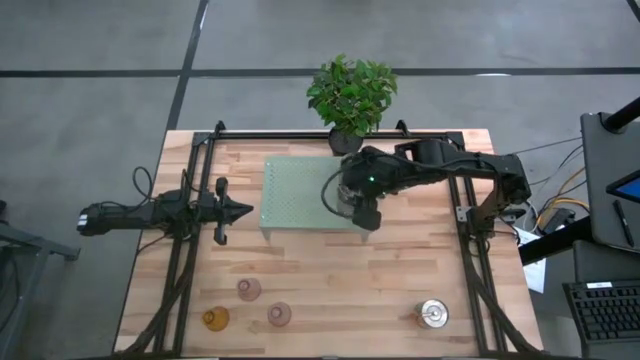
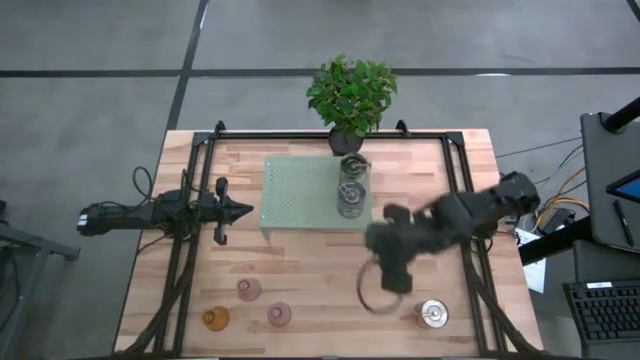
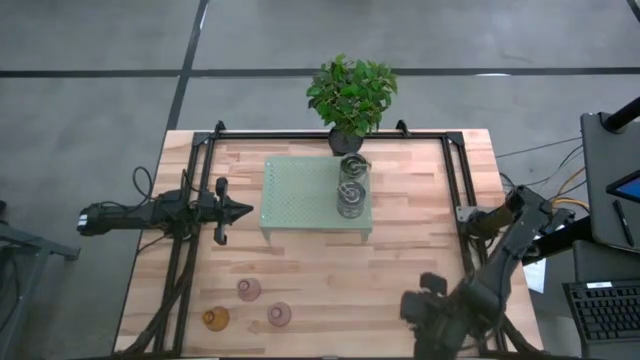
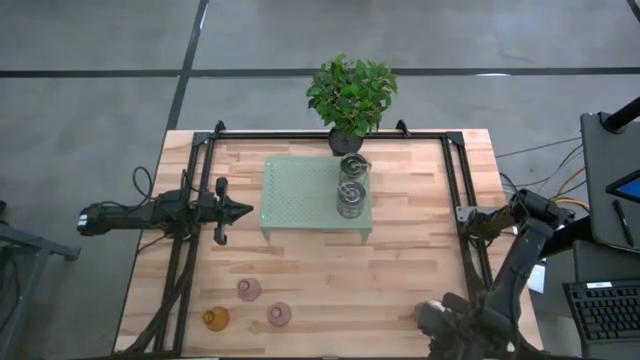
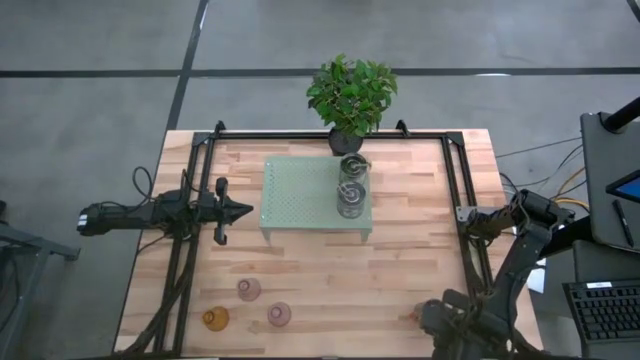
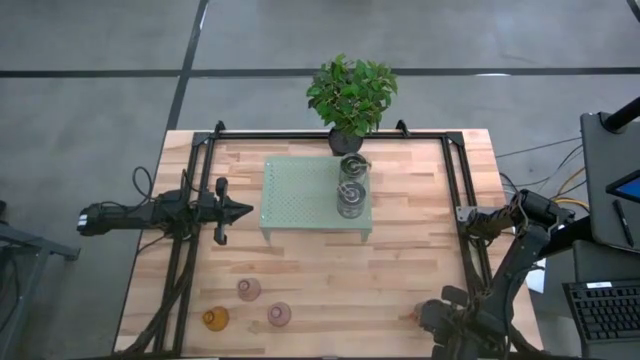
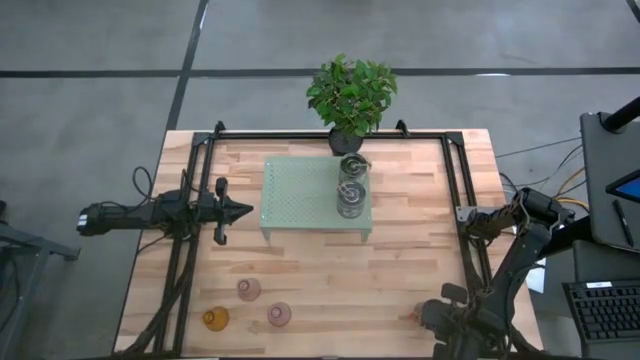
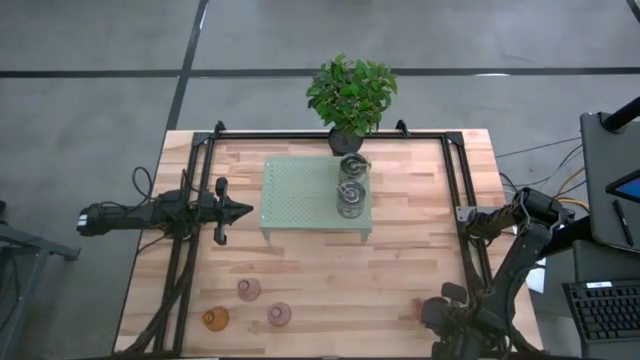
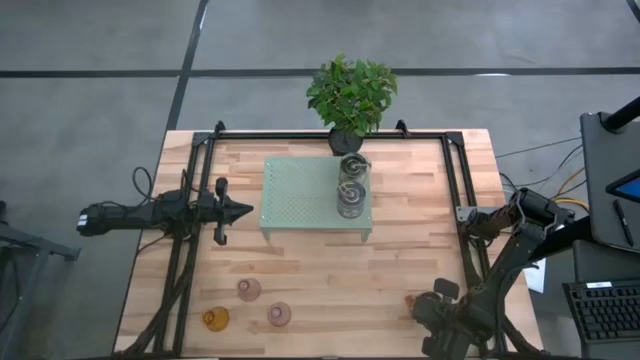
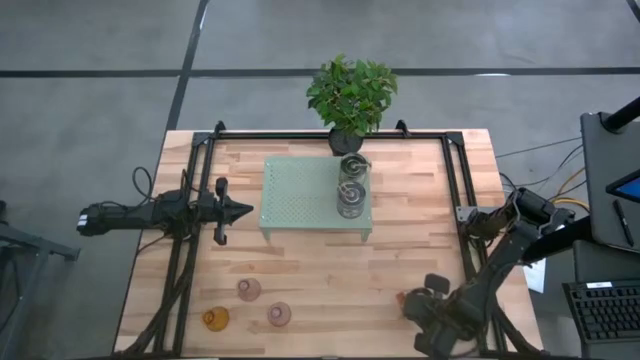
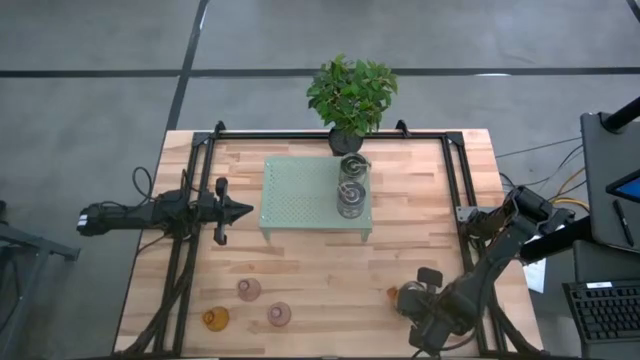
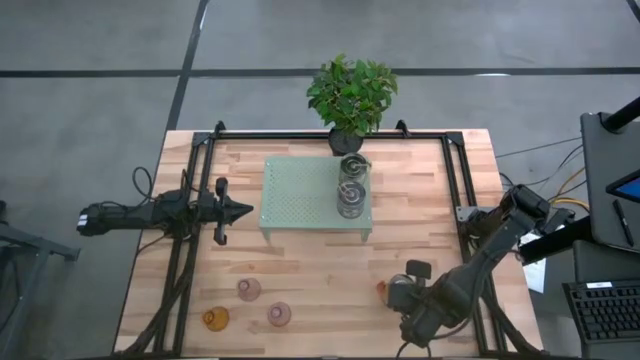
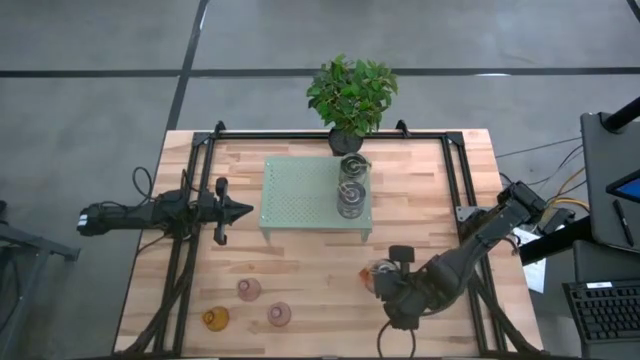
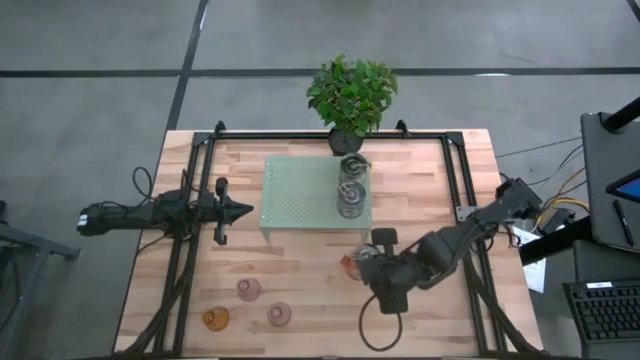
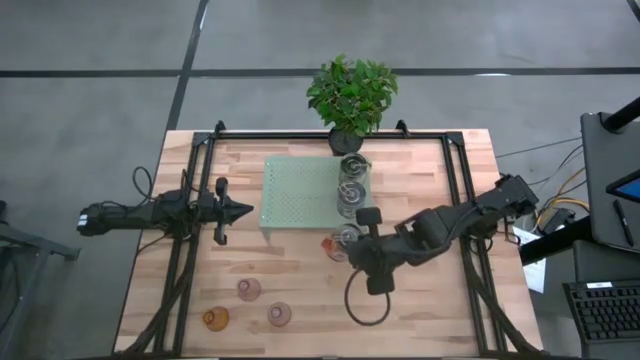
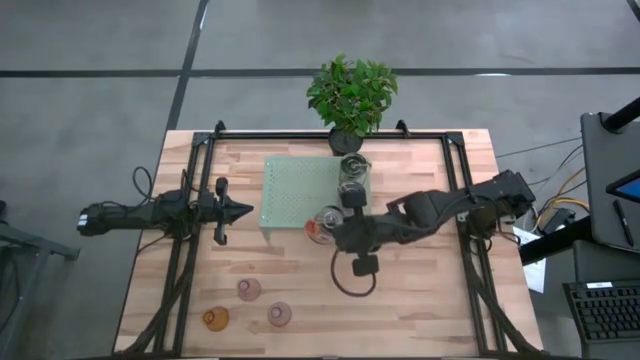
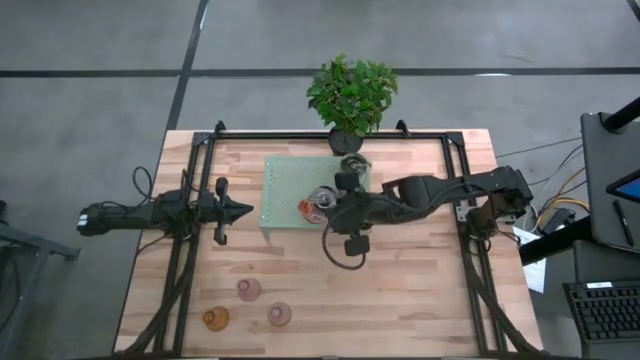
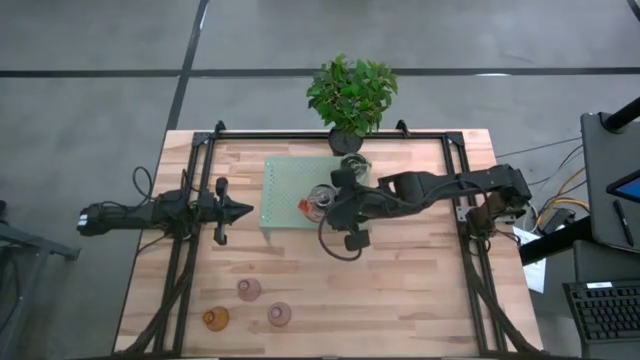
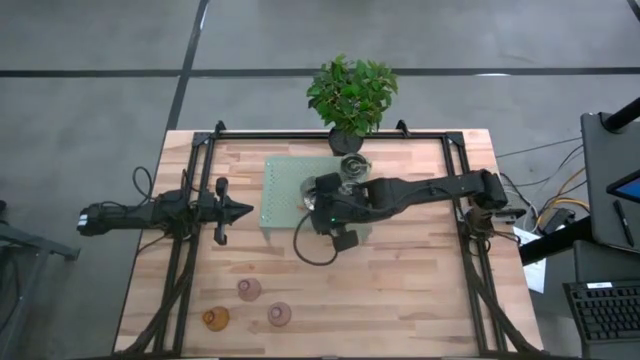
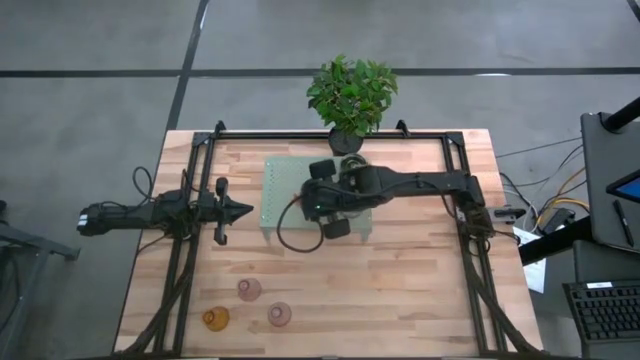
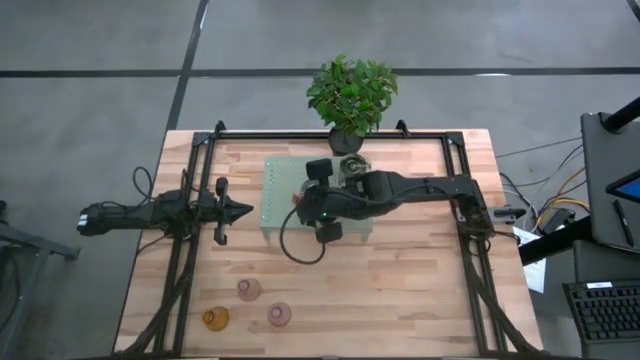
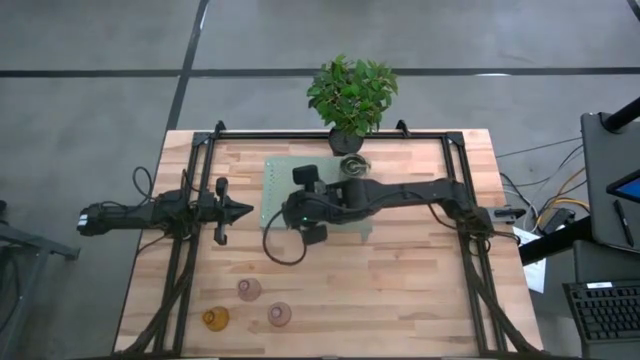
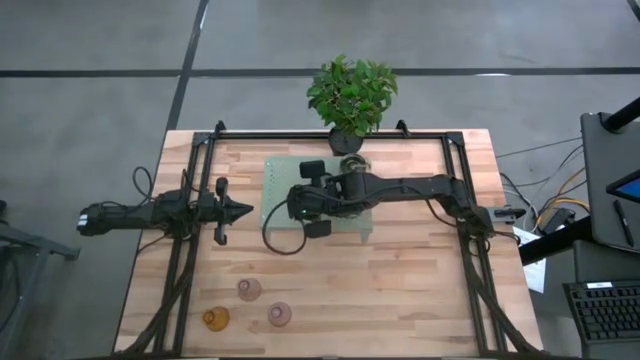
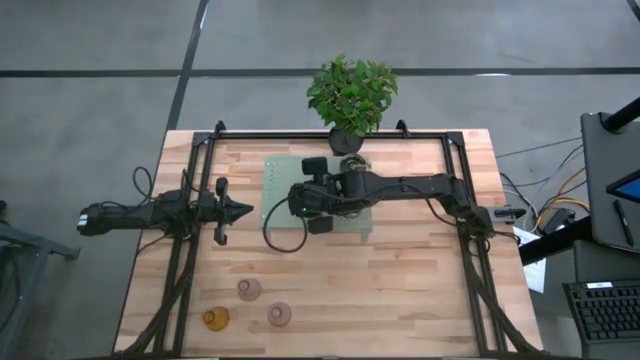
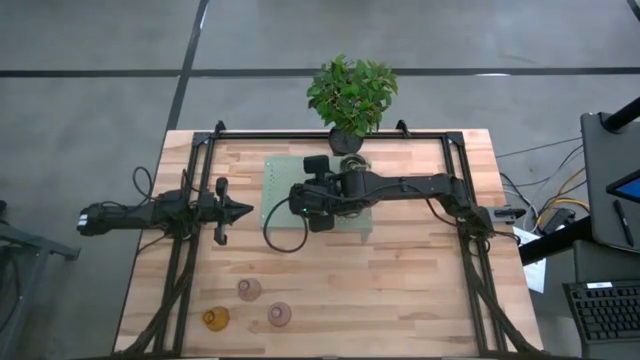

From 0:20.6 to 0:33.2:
Task: Pick & Place candle stick holders
Put the silver scented candle on the shelf
